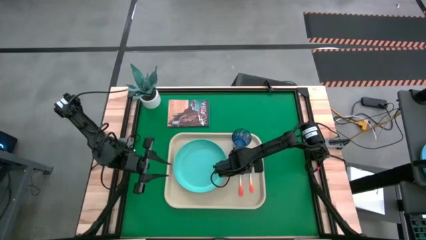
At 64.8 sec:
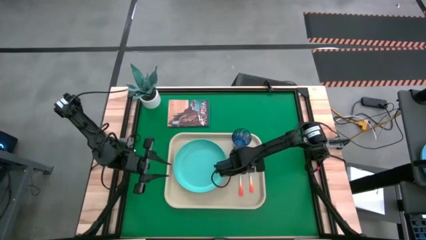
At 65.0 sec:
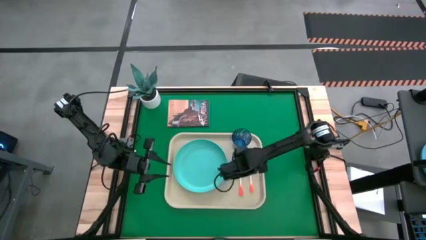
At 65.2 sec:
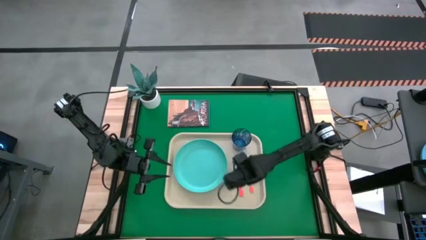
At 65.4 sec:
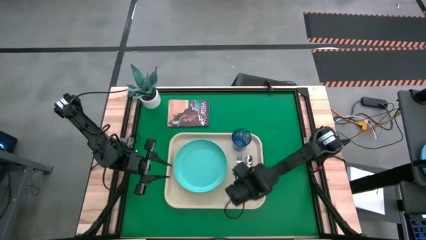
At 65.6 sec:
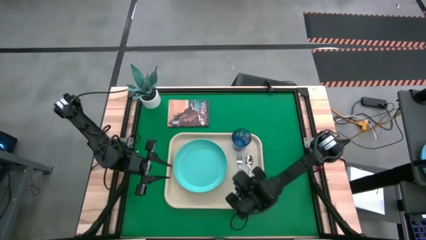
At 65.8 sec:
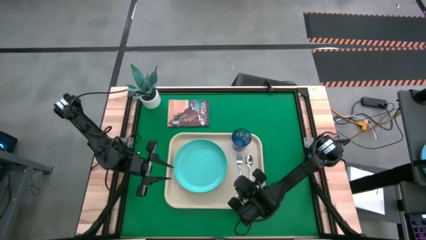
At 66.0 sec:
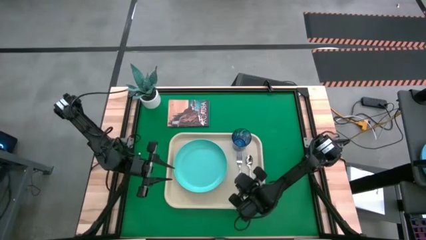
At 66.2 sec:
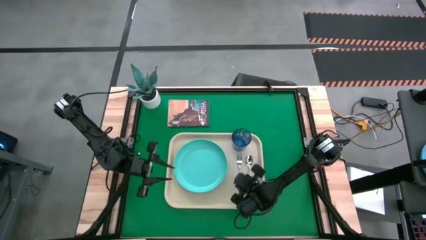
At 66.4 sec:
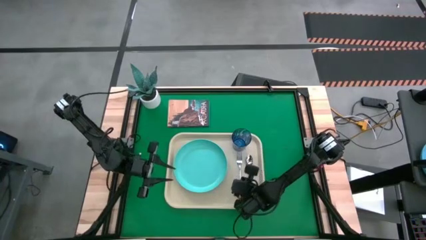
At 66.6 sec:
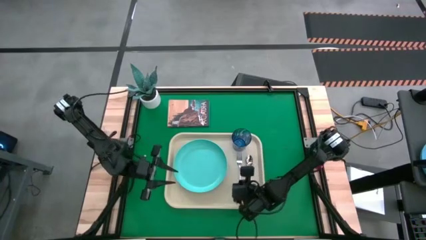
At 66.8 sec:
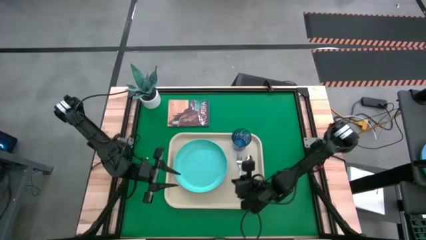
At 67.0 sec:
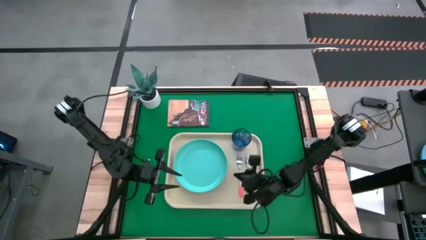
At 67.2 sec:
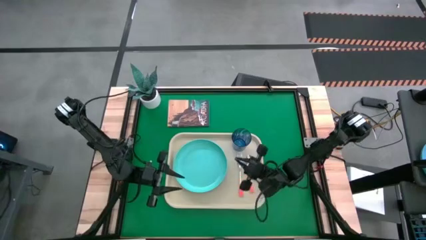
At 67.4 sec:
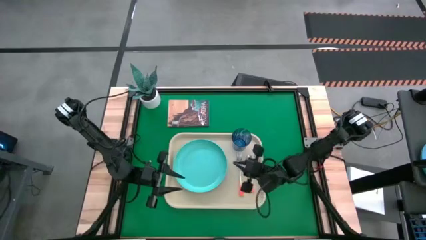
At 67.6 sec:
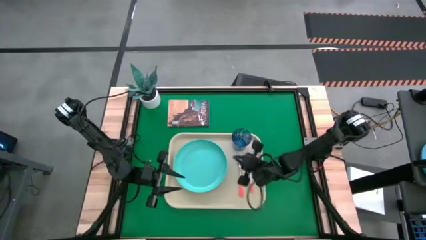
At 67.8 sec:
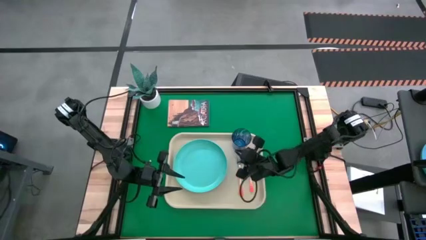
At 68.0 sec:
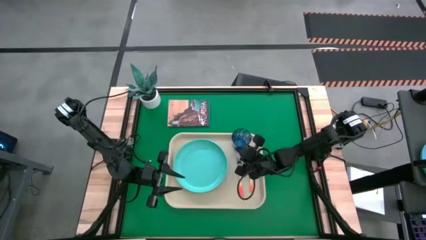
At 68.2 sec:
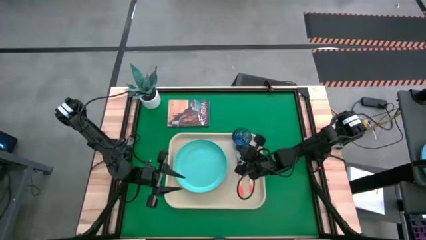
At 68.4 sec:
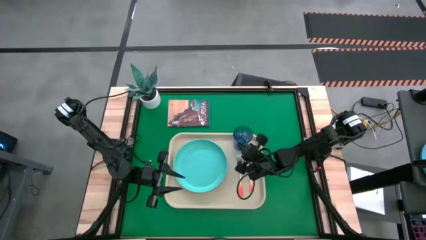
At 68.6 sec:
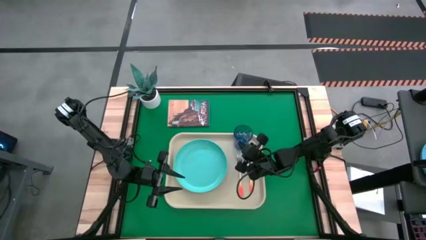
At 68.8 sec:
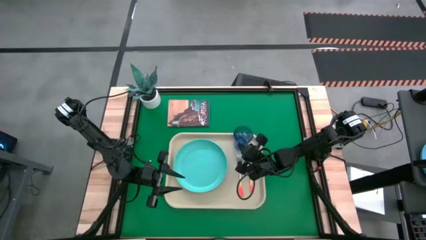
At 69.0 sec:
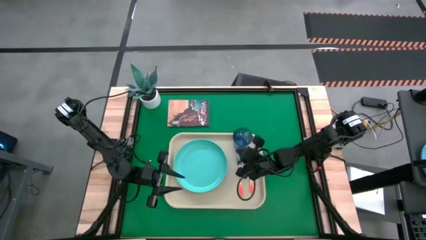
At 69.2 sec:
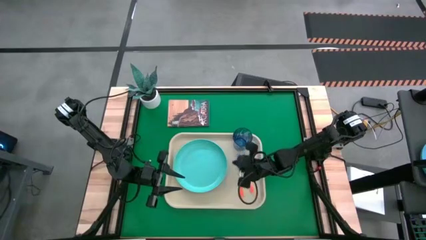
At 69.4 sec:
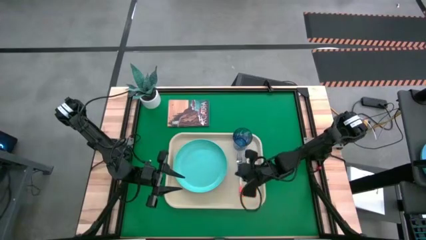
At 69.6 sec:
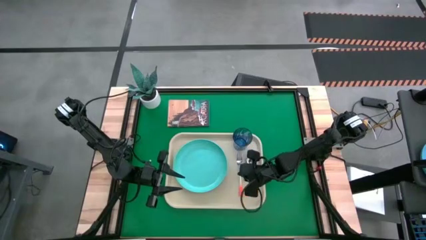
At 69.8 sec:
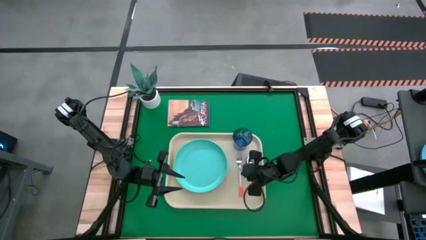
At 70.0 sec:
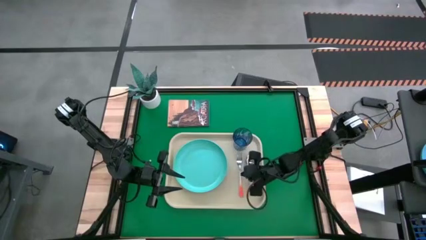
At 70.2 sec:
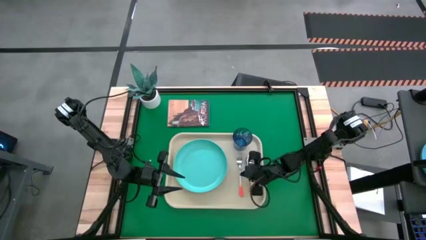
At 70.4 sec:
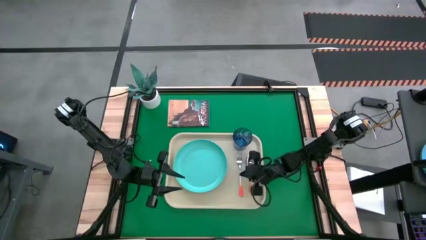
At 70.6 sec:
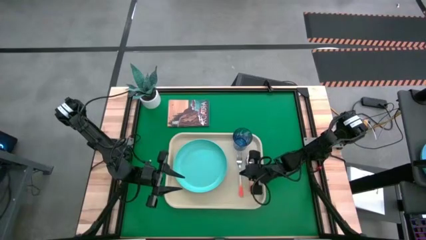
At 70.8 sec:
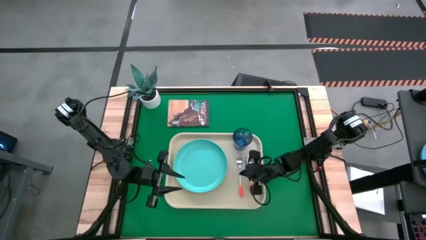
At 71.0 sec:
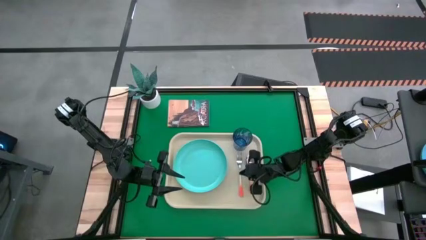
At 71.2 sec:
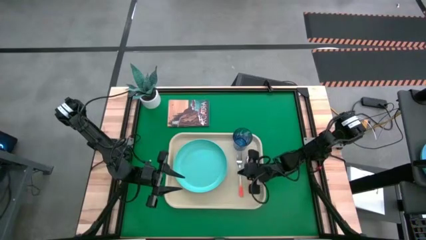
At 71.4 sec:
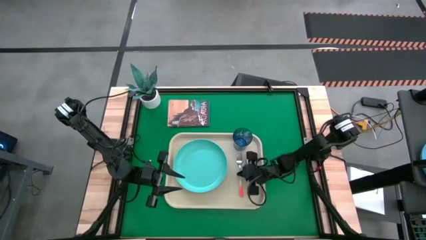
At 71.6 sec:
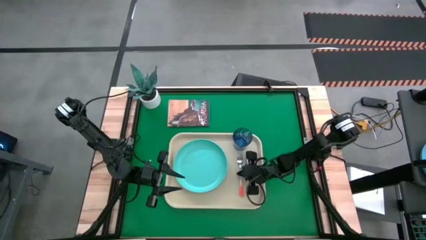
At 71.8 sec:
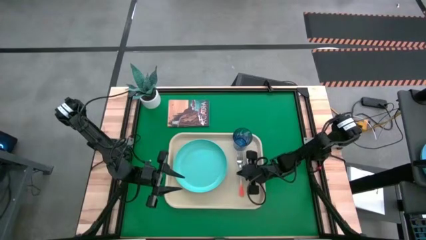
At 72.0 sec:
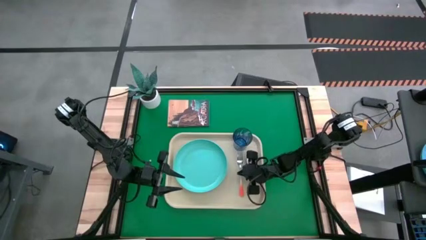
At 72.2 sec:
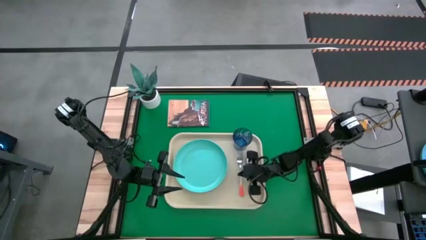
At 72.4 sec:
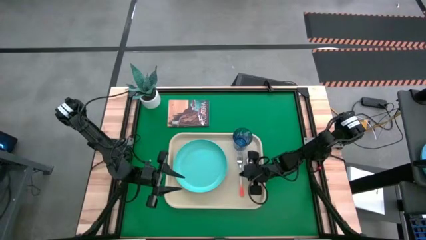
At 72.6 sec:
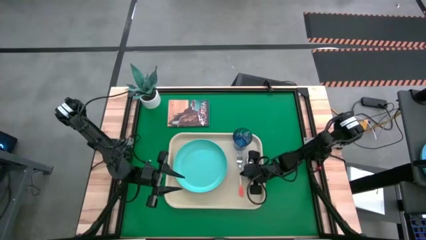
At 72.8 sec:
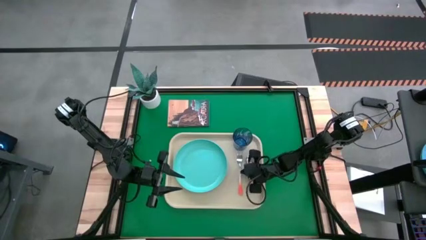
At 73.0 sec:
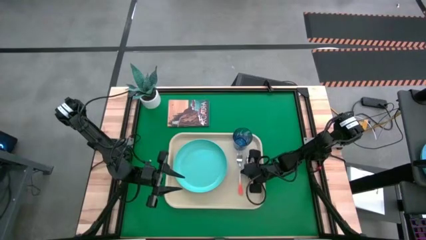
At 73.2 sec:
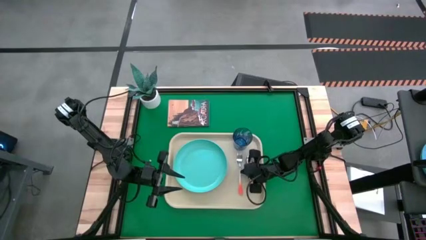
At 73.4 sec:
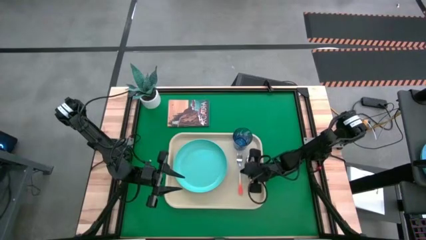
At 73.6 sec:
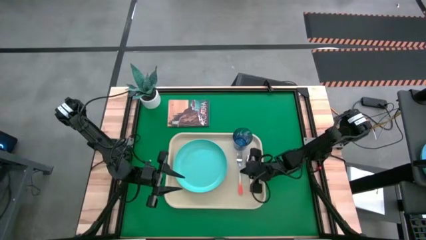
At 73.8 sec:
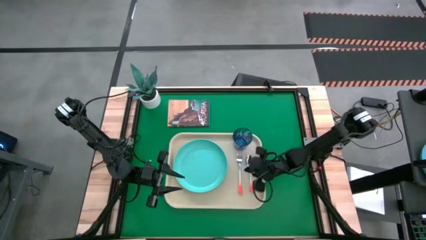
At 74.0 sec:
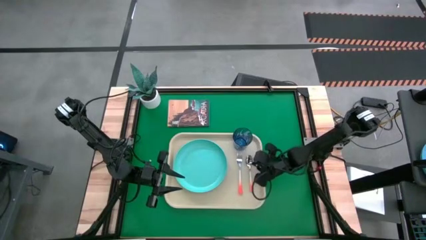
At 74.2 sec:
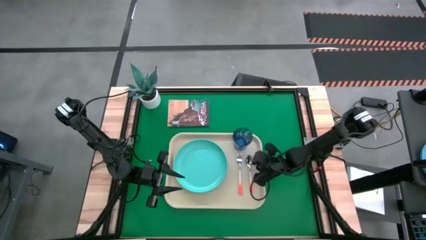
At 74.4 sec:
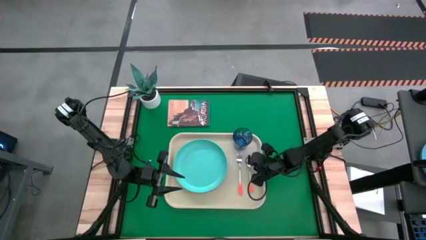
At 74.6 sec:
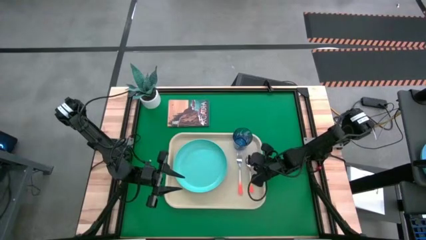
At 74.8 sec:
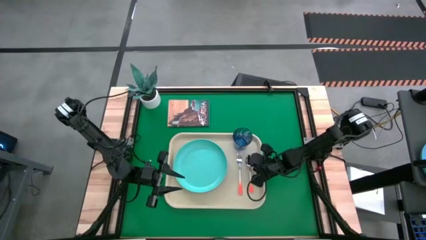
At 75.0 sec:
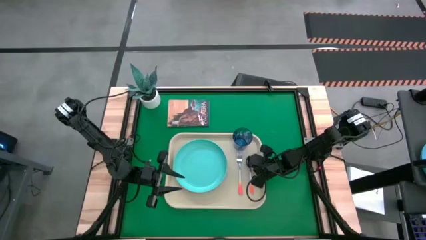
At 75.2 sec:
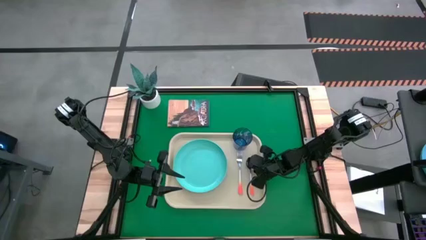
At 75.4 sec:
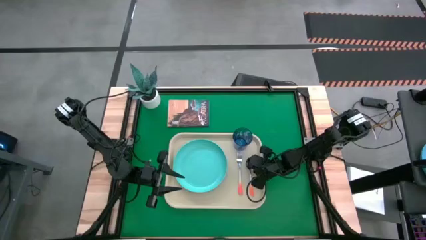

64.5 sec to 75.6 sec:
Task: Pick and place plate/cup/fork/spoon on tray
Adjust the tableware on the serving tray

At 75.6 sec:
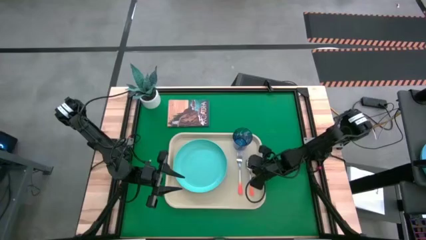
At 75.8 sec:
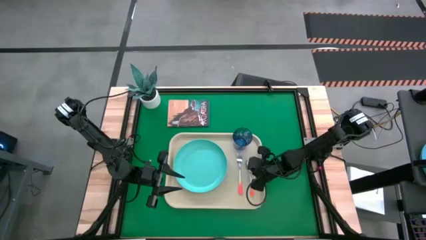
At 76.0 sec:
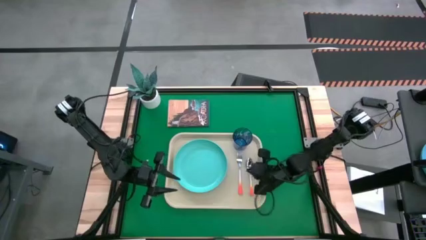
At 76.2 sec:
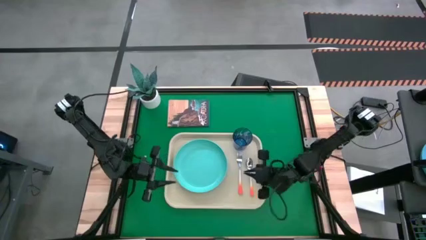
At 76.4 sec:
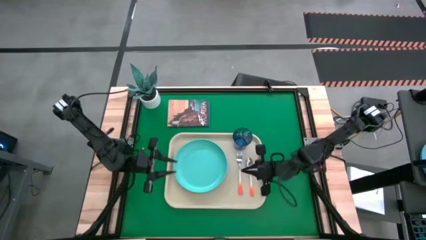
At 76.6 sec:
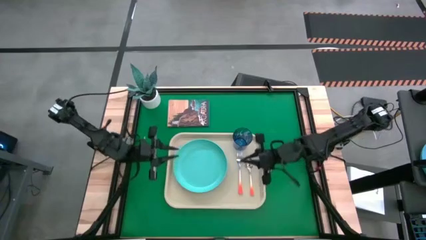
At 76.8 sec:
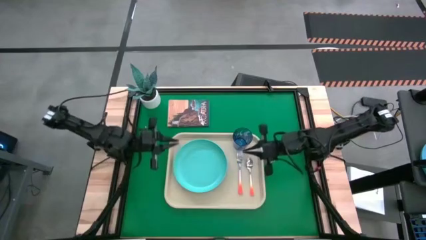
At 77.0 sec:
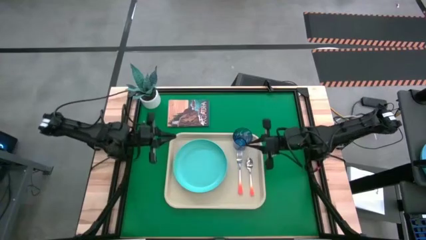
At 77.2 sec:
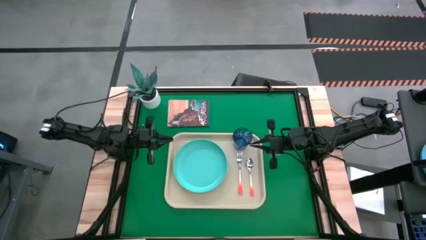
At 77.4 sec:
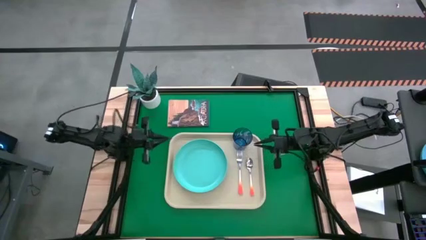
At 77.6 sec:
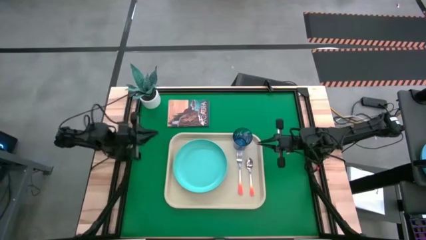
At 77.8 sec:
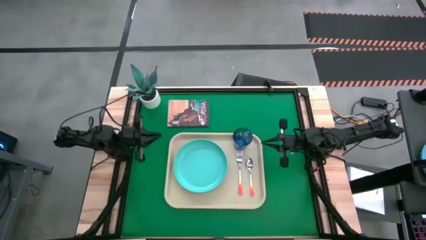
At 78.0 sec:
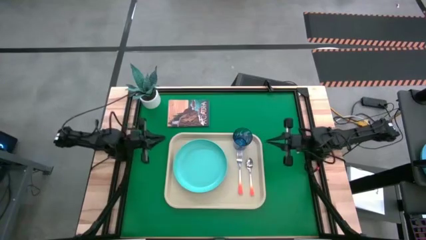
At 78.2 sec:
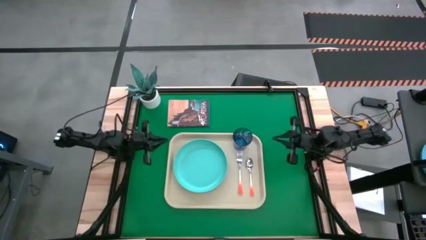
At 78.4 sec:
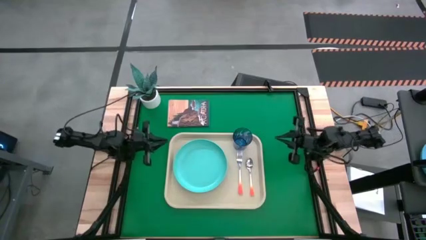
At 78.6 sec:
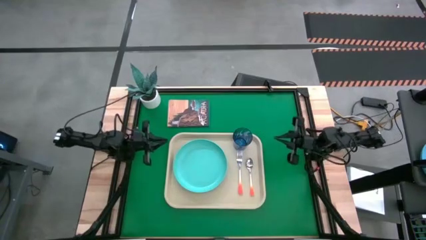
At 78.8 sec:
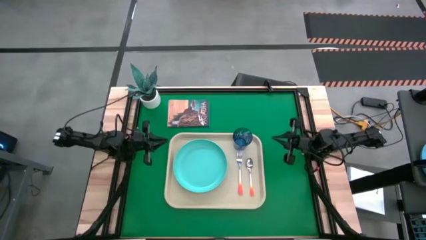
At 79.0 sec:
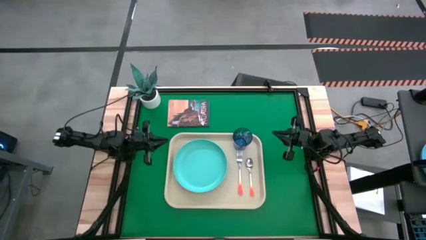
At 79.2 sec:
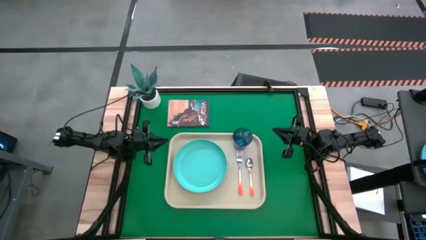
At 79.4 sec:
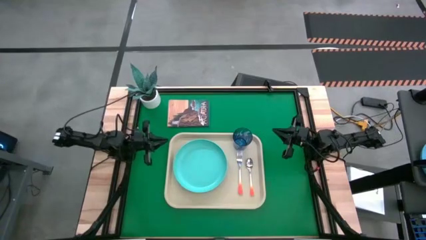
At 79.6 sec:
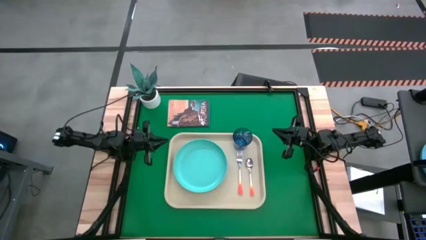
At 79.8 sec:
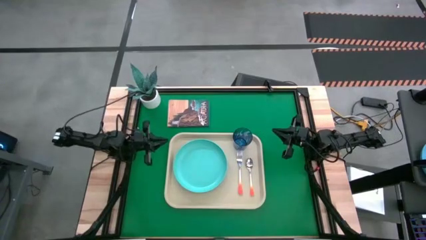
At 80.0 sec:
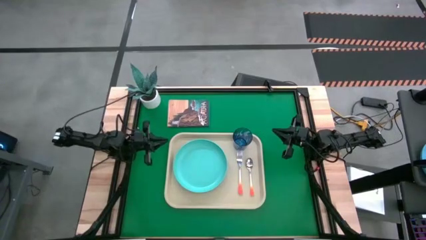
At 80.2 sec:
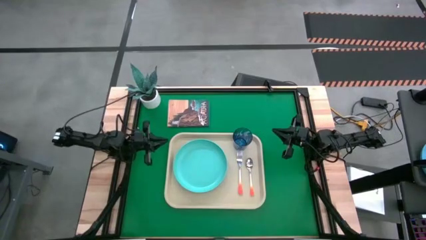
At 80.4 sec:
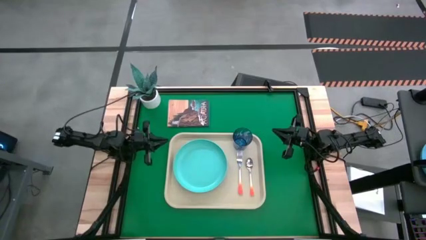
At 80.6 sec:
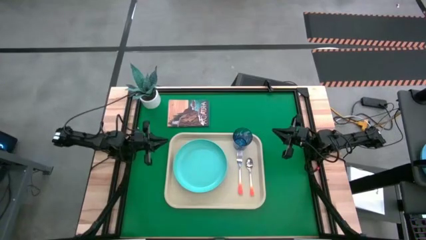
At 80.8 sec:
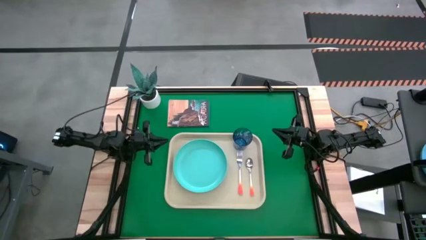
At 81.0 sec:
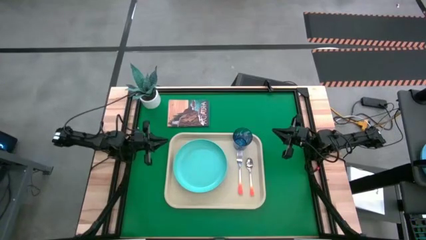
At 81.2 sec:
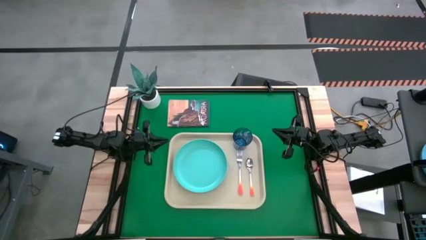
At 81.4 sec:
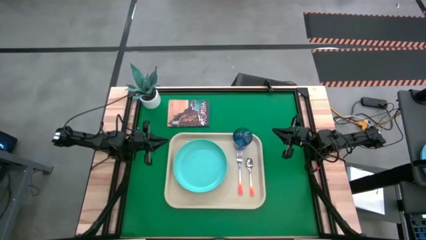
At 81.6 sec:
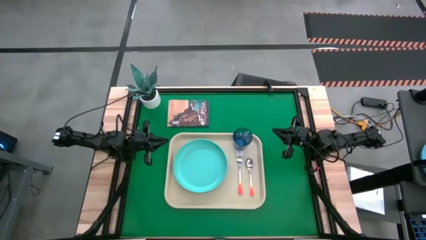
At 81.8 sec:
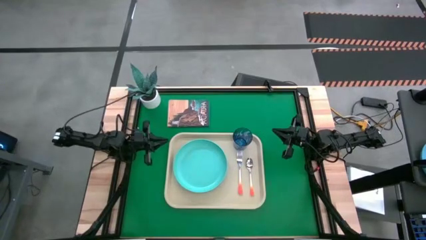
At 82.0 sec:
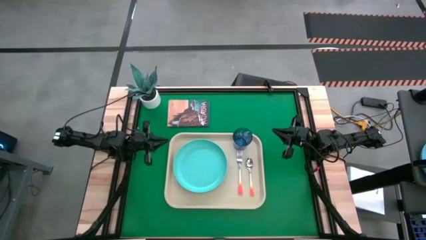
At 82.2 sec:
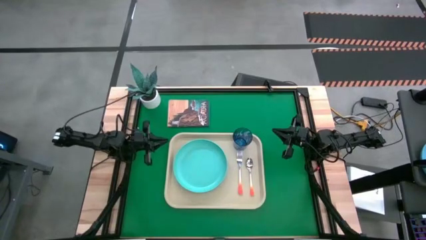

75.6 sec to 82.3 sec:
Return to Home Position
